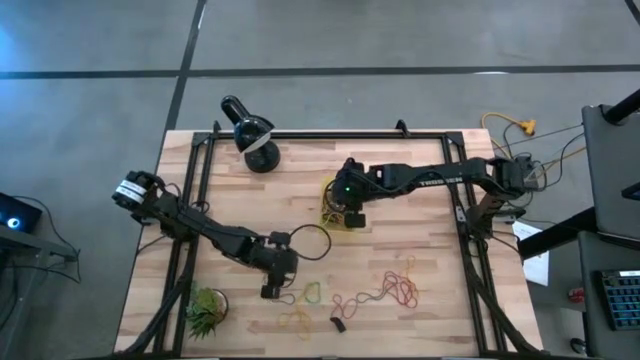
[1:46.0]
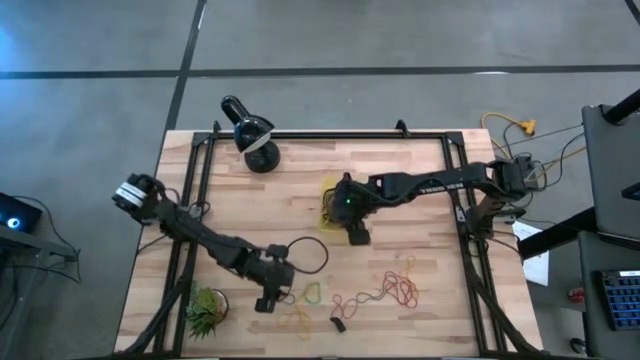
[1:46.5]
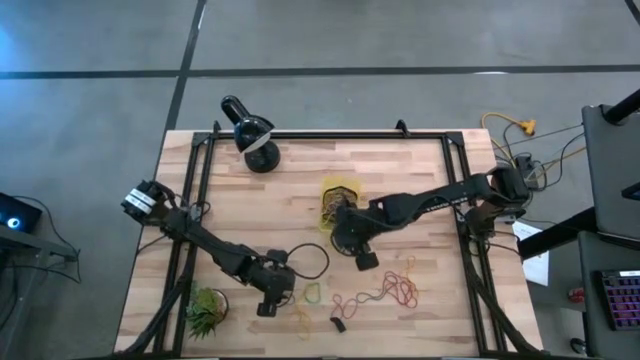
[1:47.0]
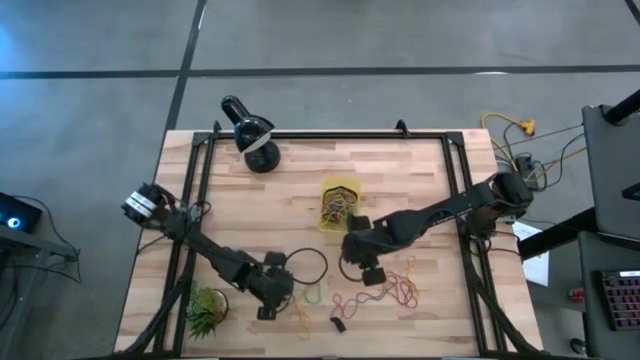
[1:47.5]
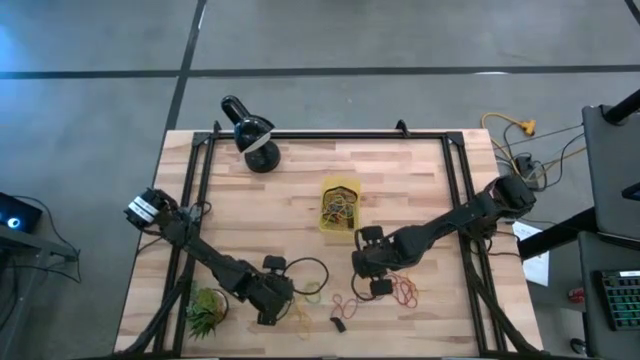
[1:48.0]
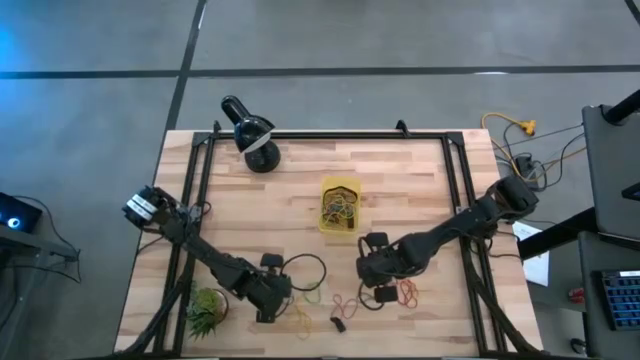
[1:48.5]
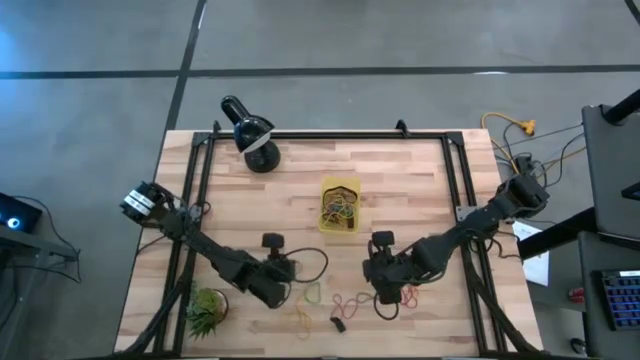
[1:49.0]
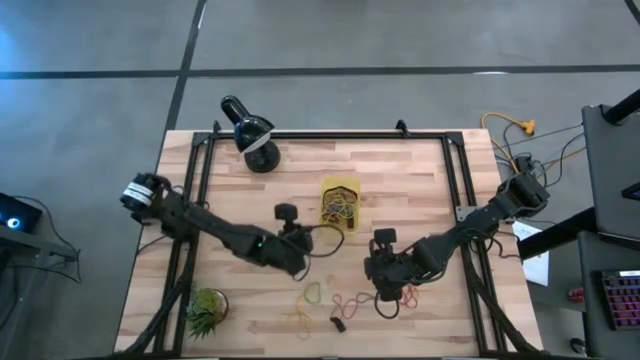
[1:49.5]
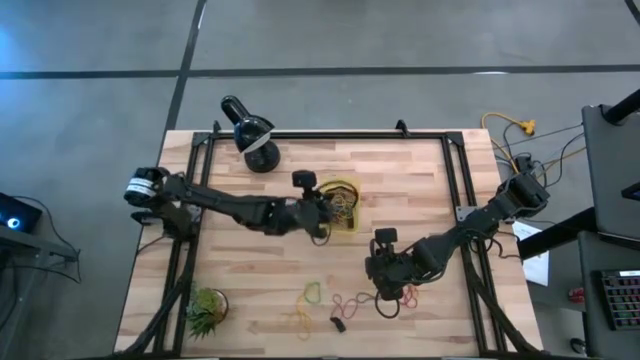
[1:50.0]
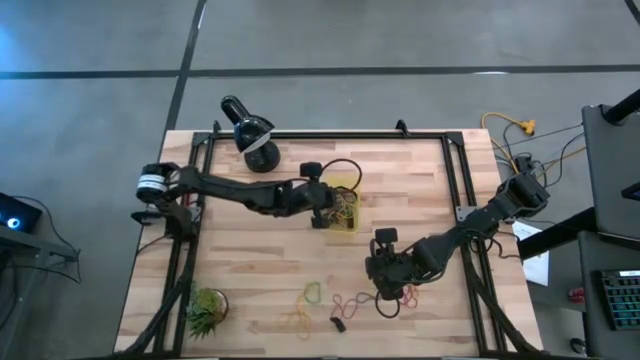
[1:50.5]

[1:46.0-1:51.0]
Task: Pick and place rubber bands into bin
Put the blue rubber band into the yellow bin

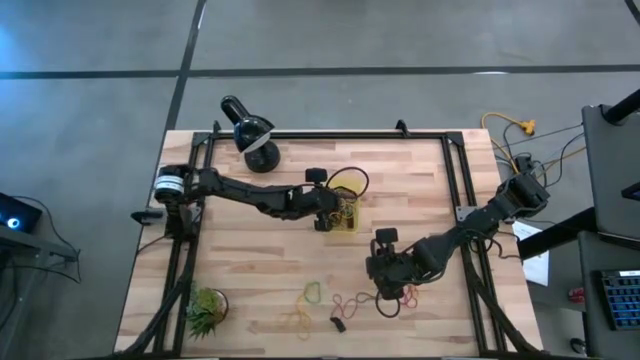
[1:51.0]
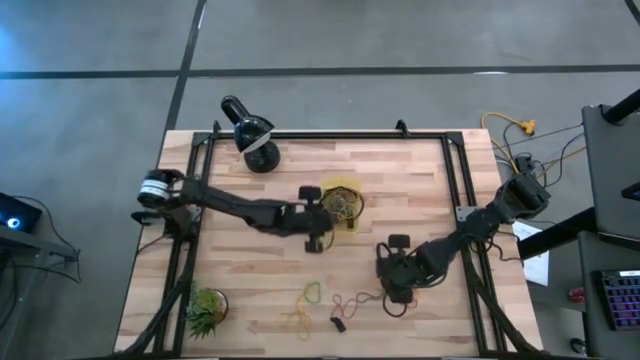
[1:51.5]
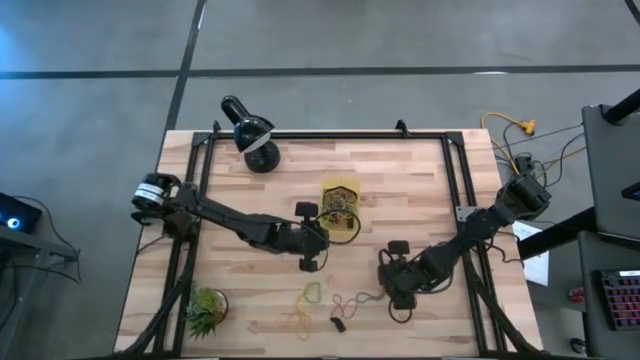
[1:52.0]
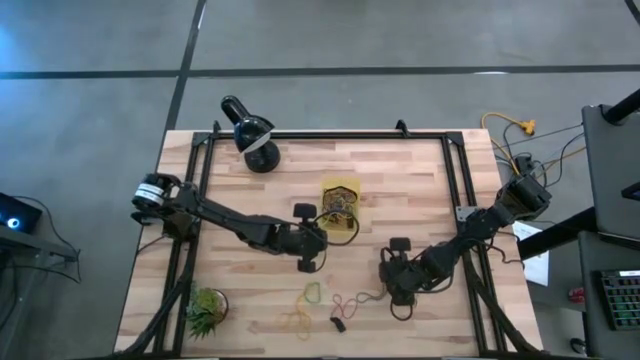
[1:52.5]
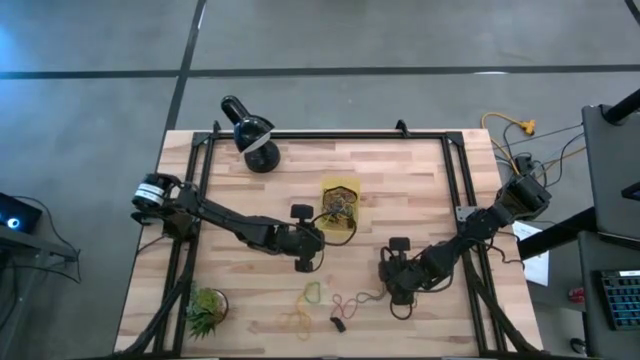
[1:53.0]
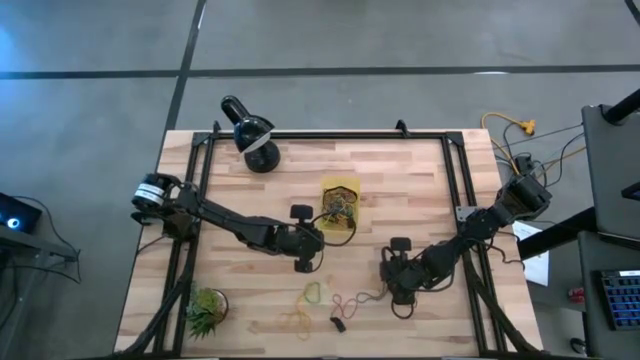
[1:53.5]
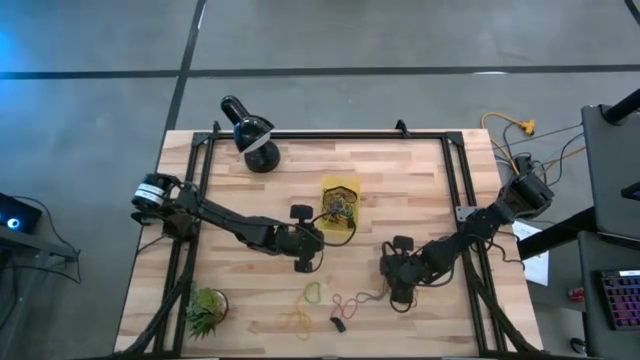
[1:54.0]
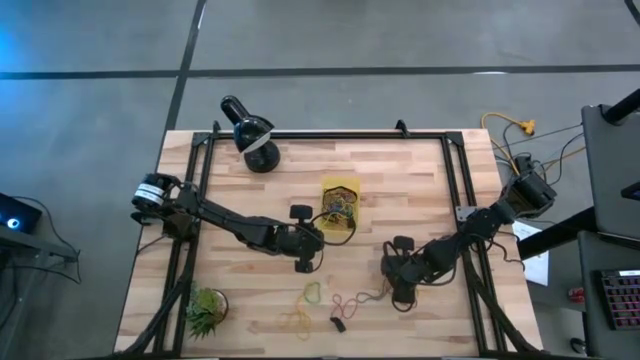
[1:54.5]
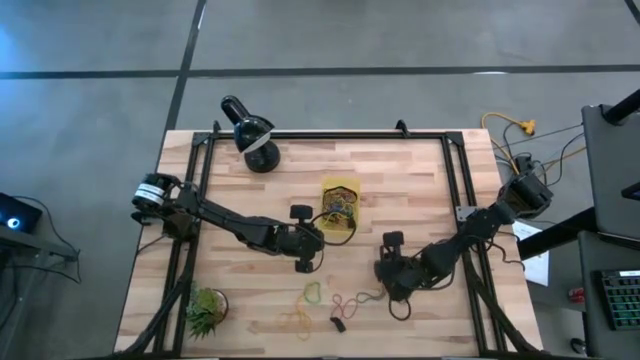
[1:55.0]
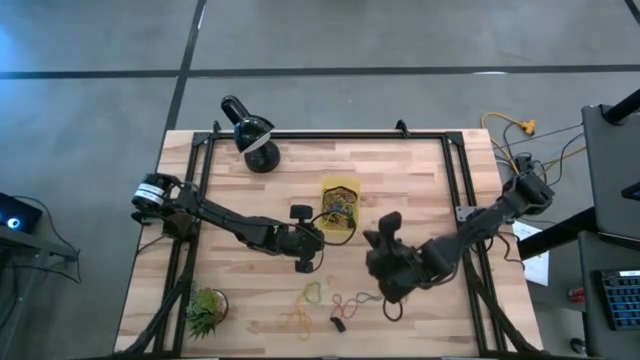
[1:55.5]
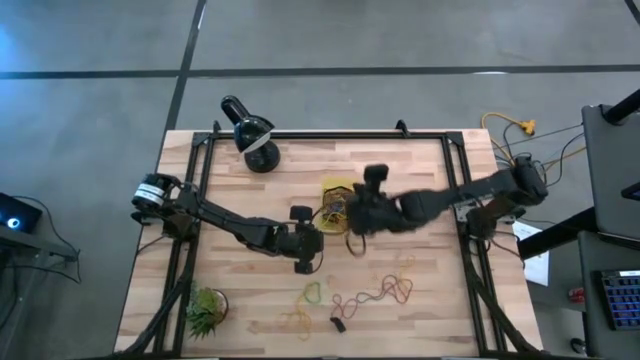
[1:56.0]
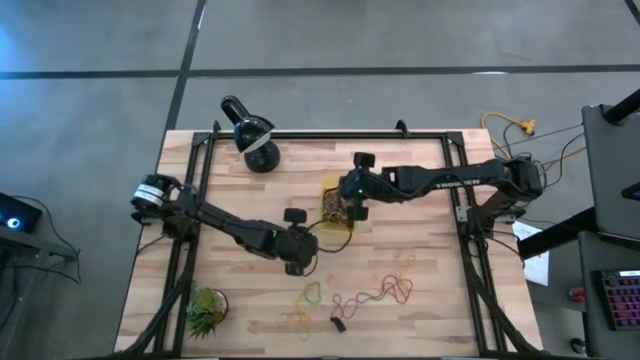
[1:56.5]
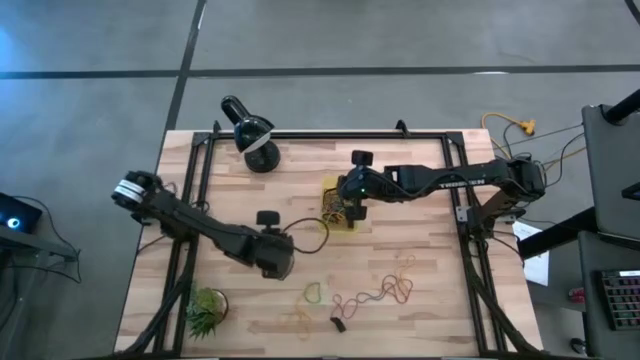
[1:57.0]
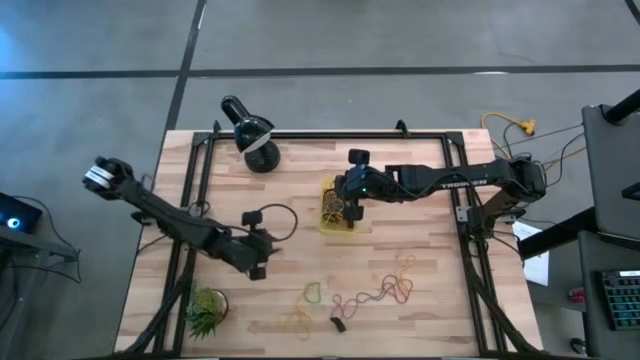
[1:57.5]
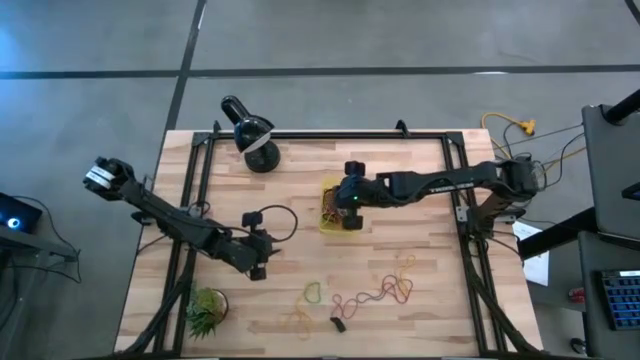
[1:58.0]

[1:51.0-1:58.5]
Put the red rubber band into the yellow bin

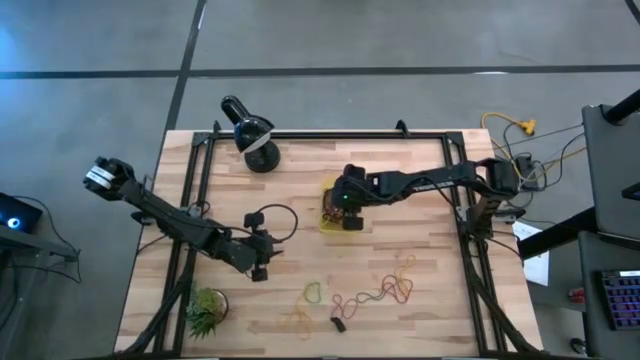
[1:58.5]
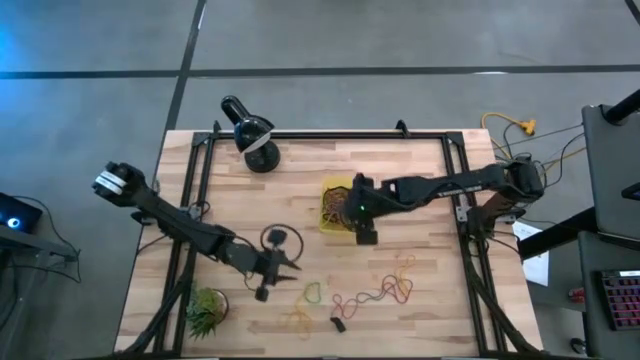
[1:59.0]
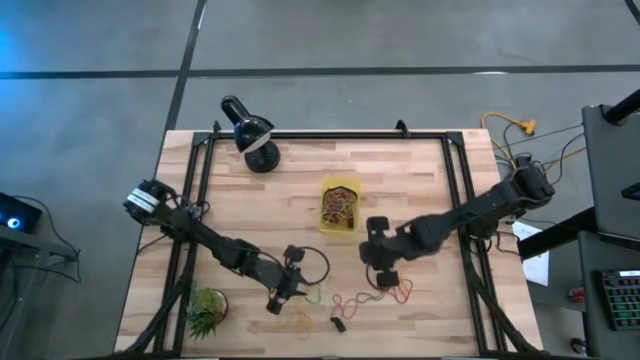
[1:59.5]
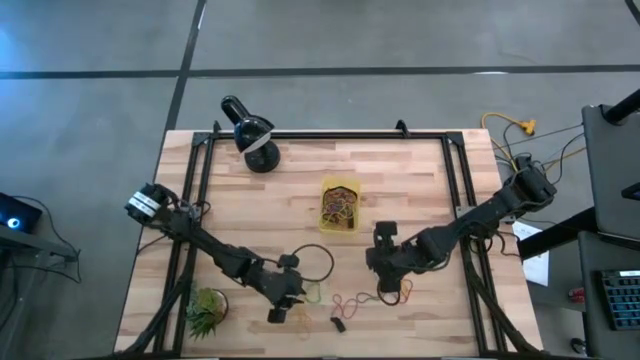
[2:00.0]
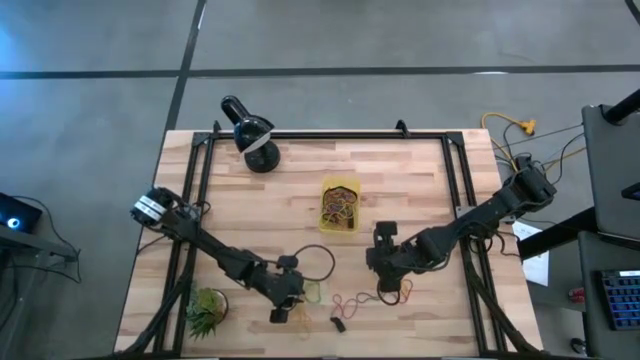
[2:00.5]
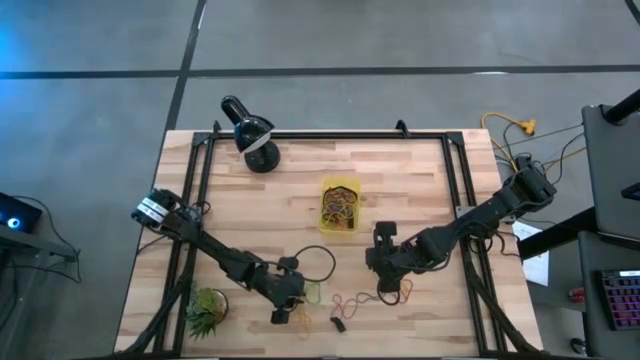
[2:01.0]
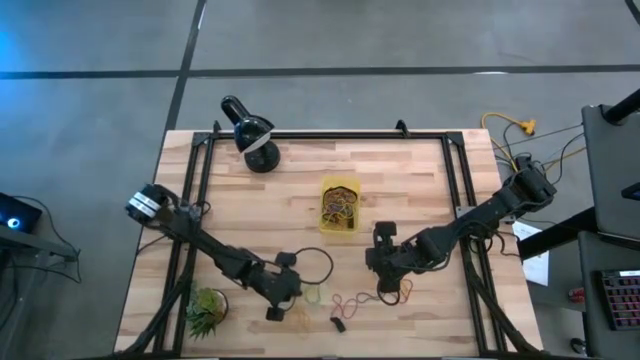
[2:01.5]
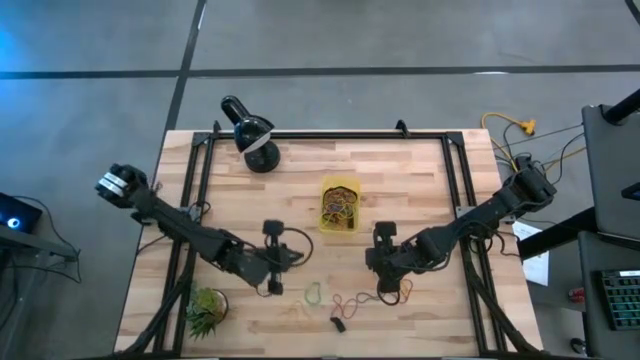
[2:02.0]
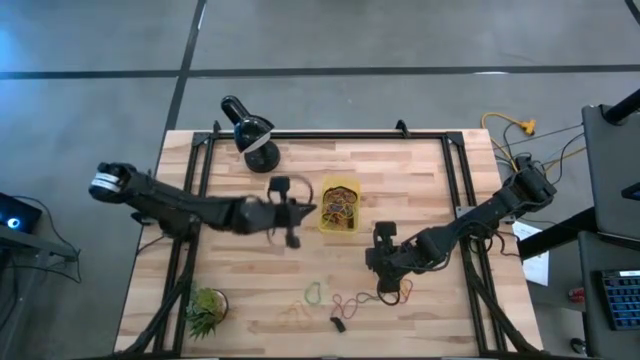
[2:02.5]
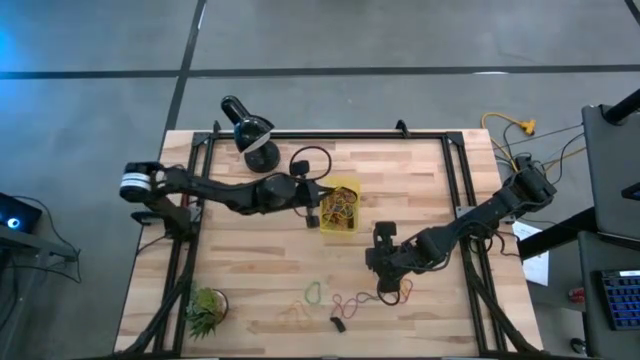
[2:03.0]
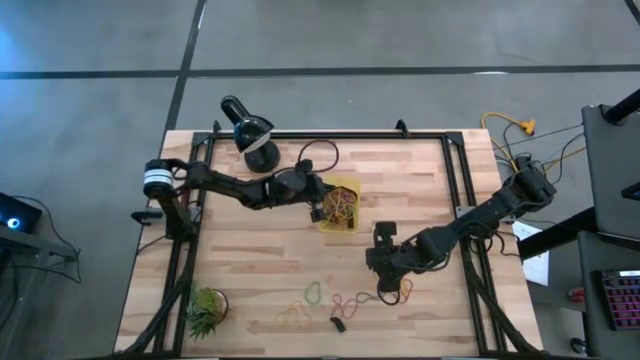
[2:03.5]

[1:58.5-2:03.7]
Put the yellow rubber band into the yellow bin

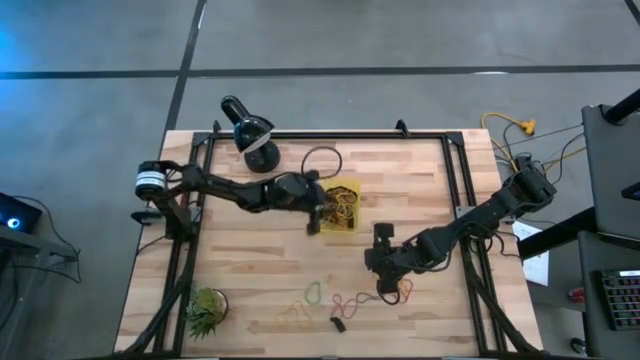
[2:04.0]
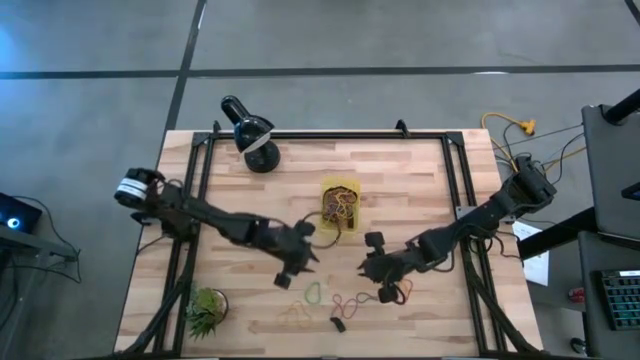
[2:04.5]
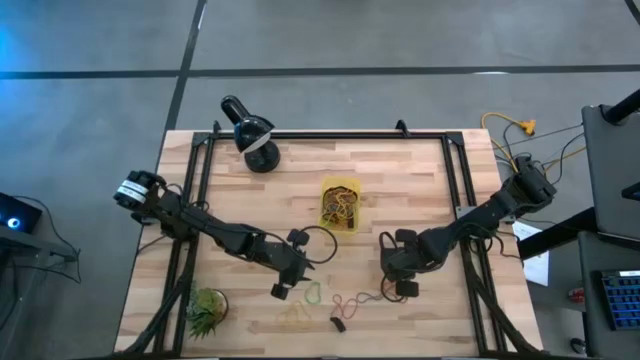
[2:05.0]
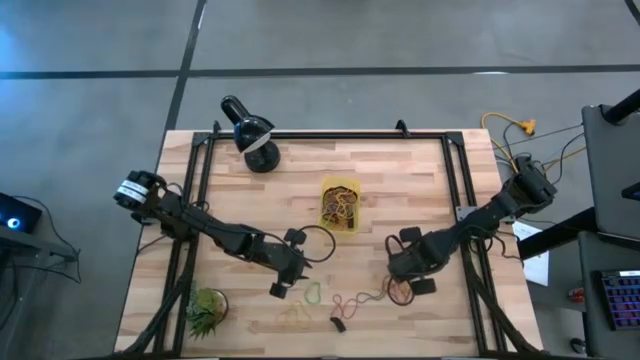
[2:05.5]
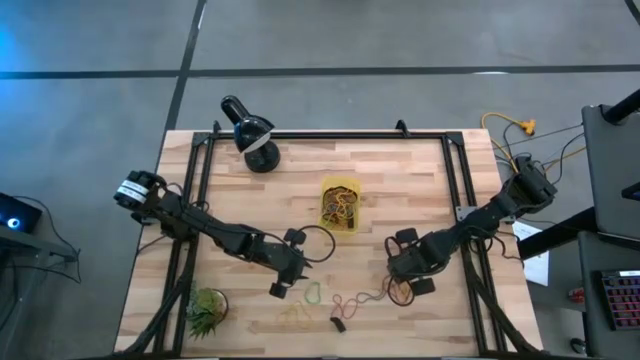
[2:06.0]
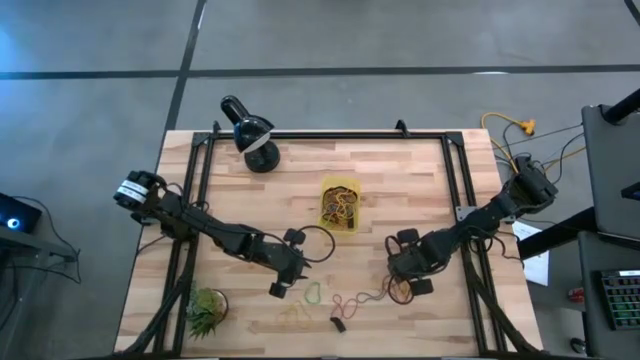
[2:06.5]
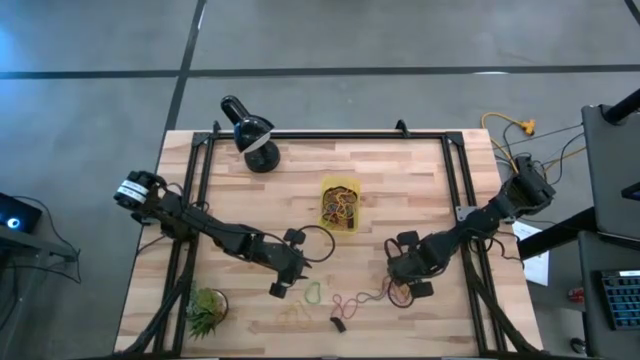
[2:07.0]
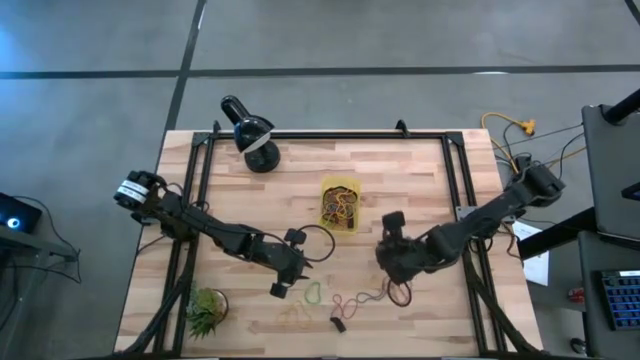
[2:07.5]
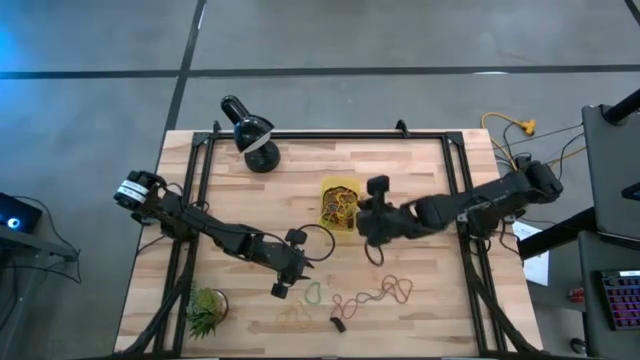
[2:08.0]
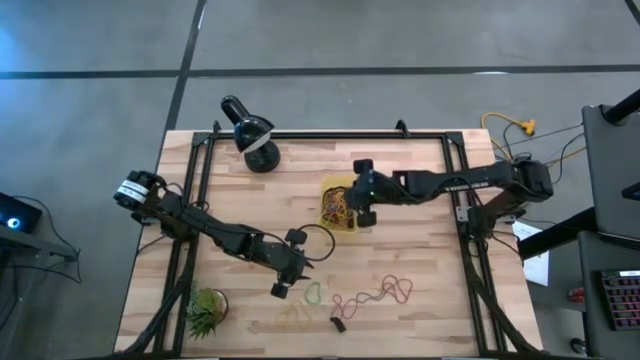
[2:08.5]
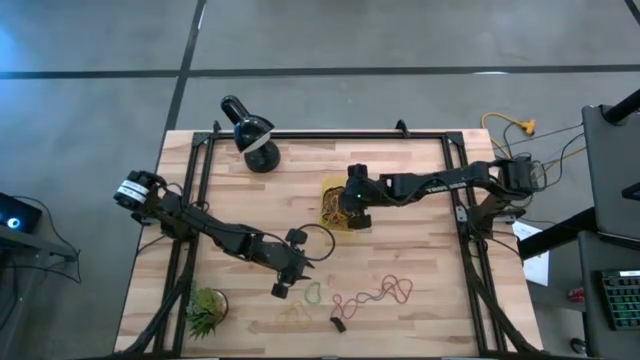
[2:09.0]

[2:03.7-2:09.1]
Put the yellow rubber band into the yellow bin
